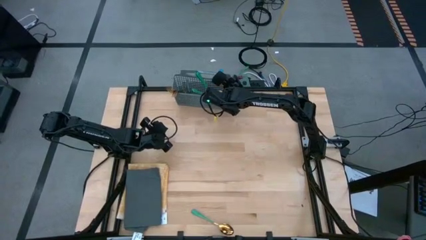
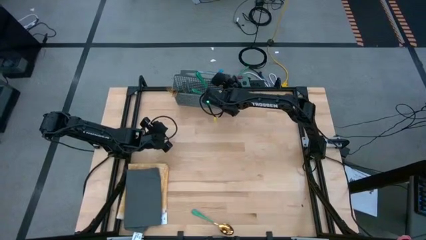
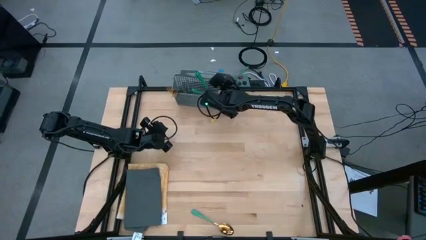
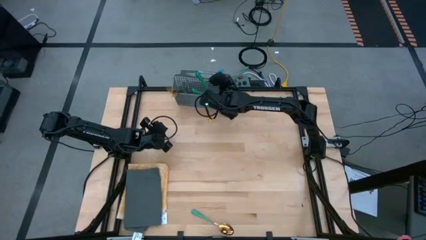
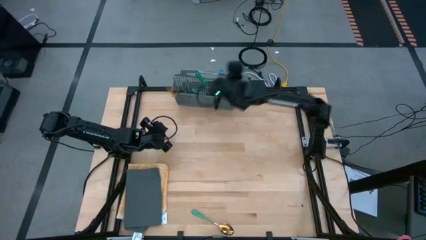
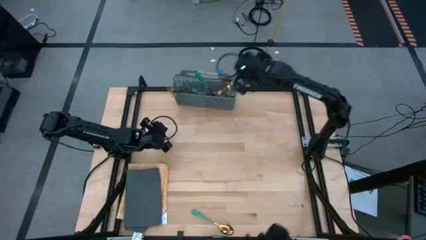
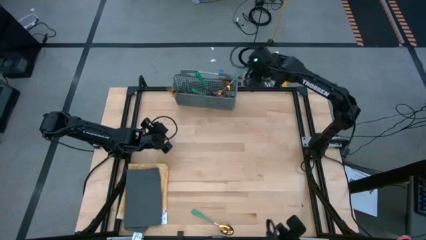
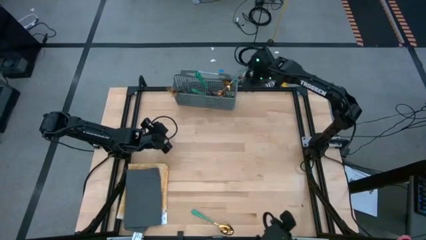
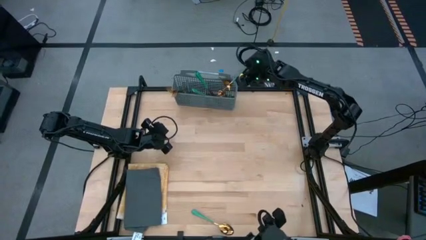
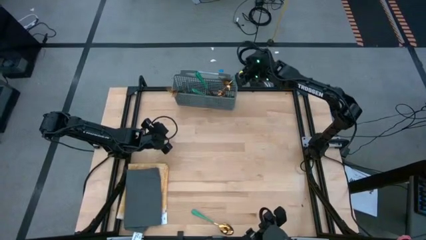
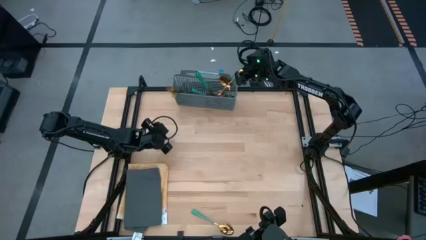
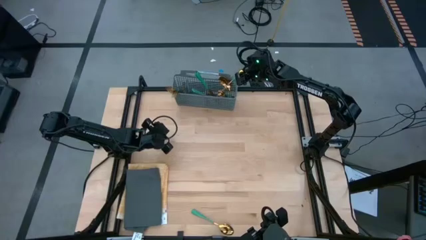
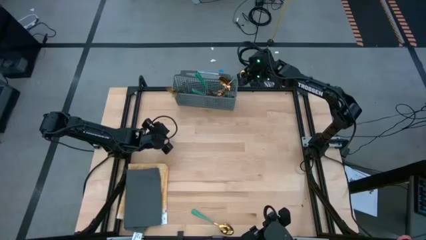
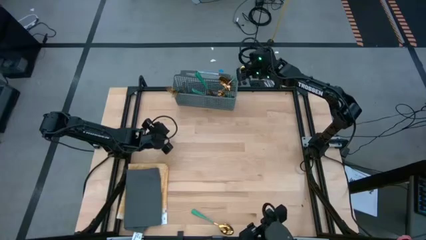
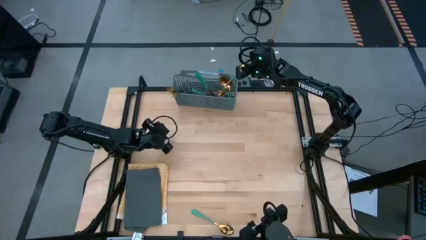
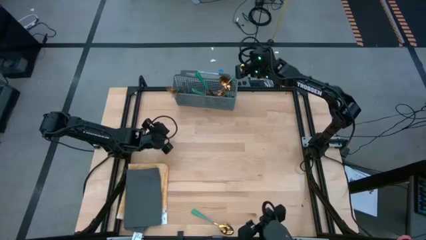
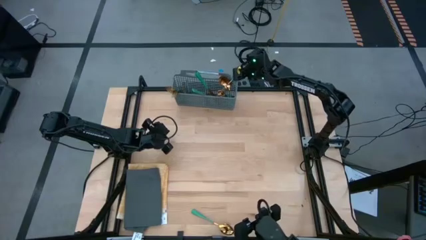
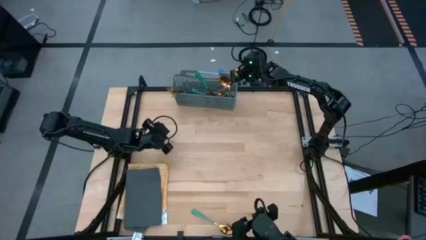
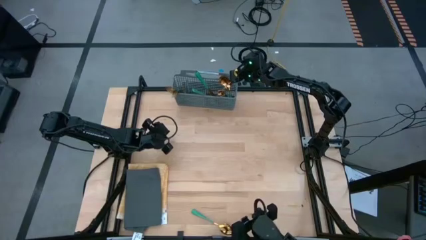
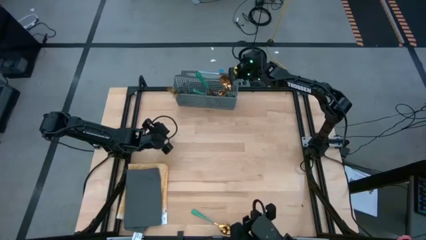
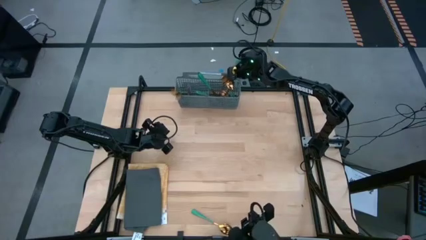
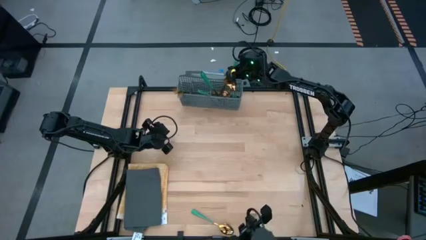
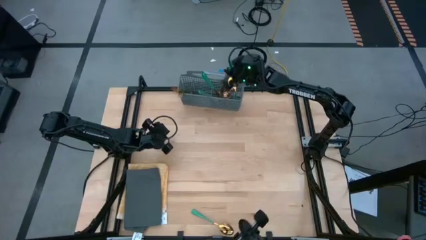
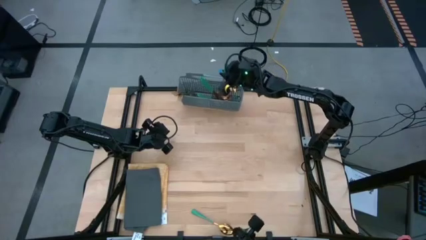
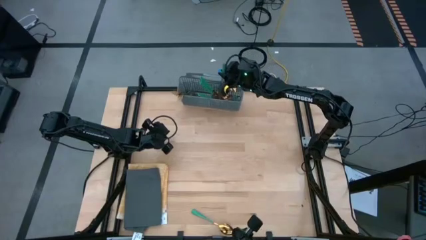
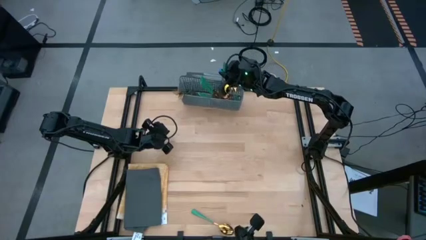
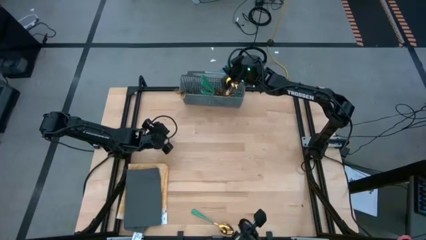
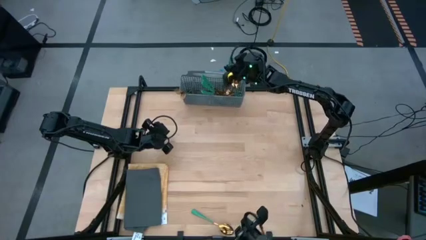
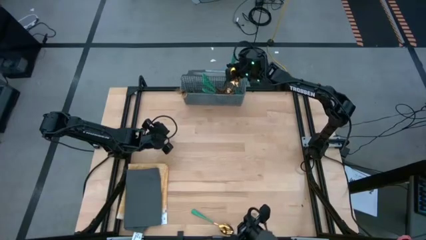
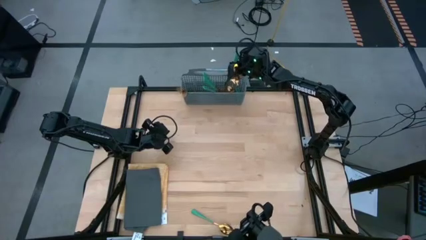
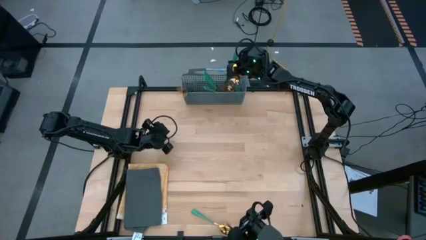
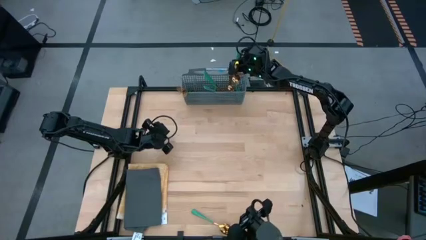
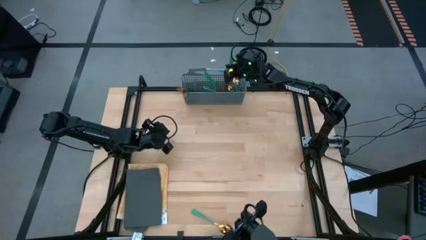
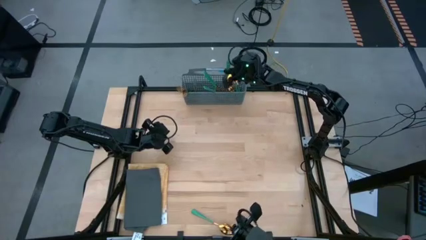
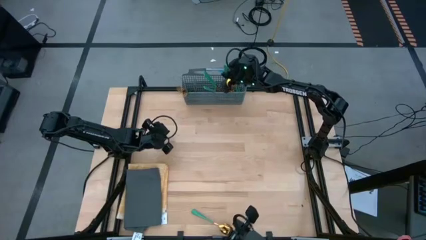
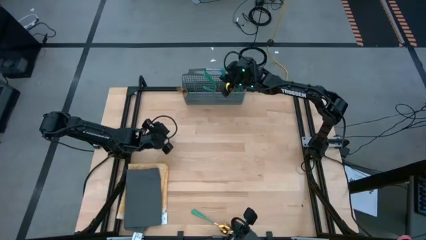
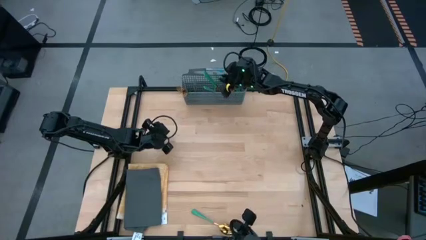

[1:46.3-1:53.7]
Task: Sort silverware
Put the green table knife into the gray silverware basket

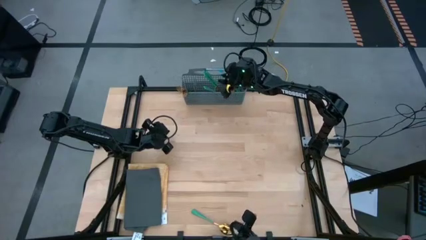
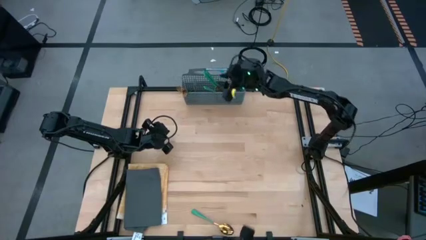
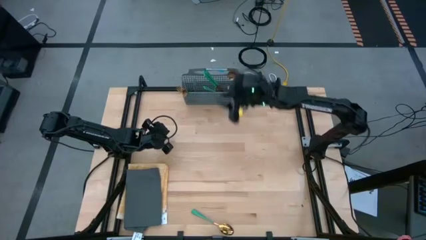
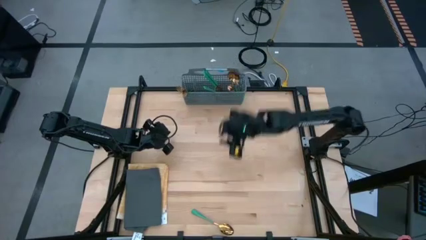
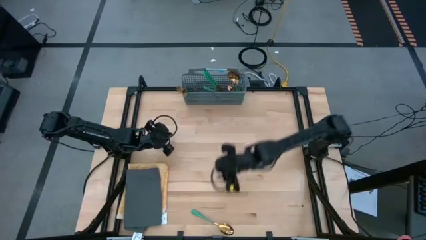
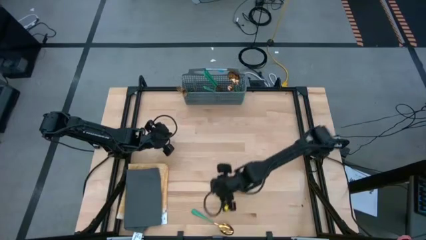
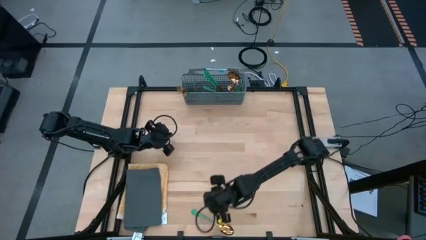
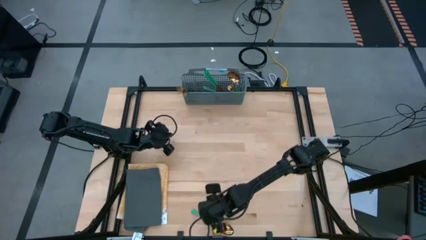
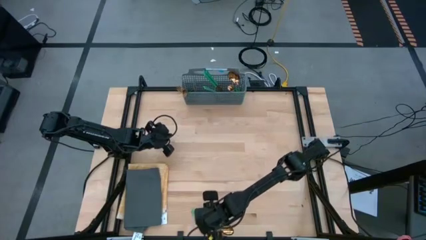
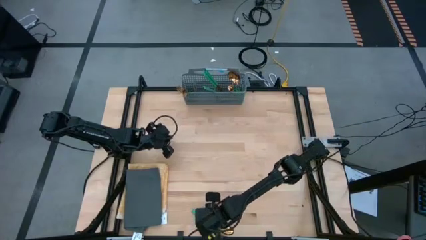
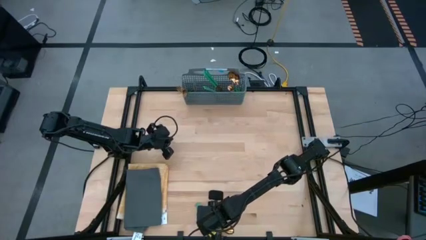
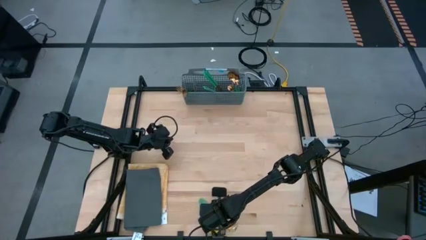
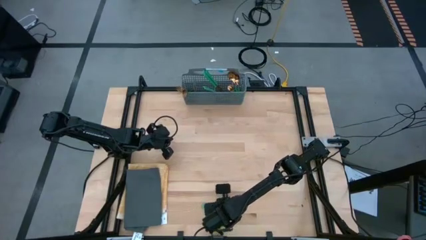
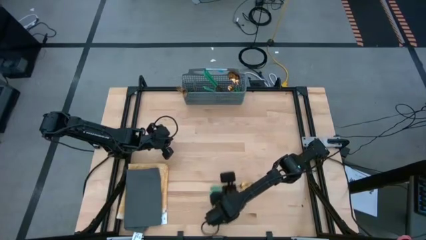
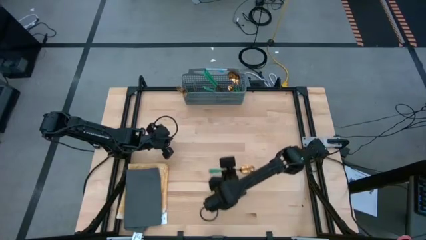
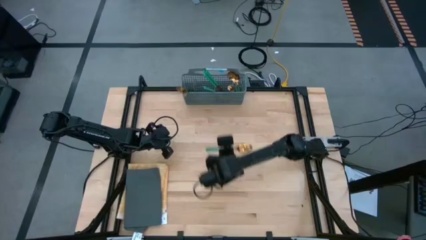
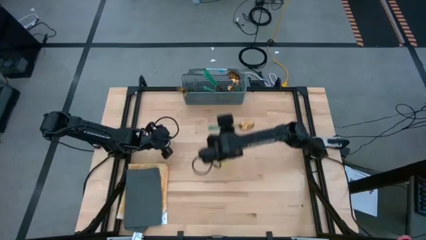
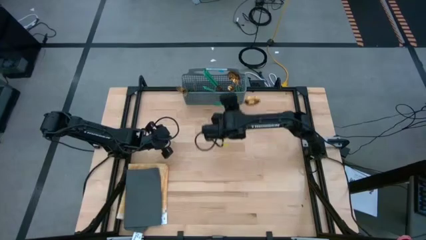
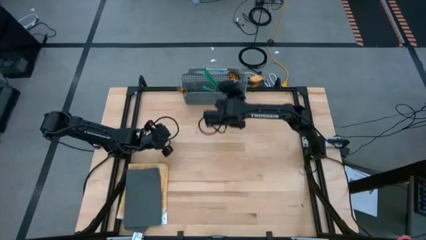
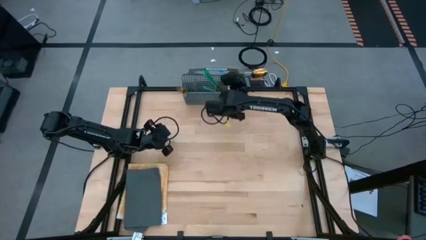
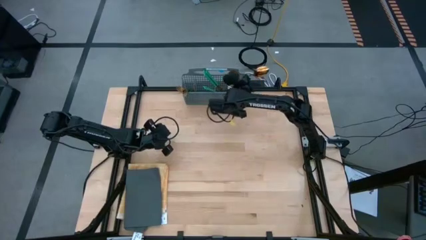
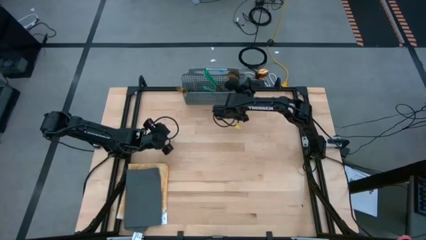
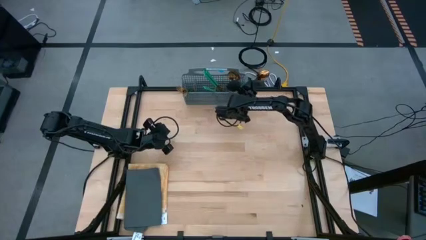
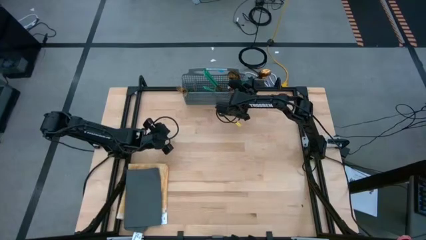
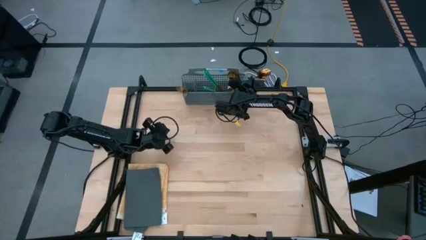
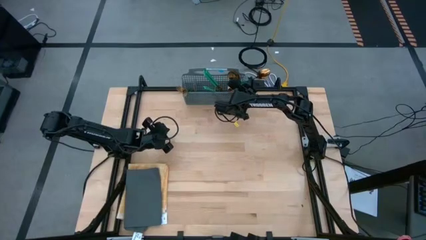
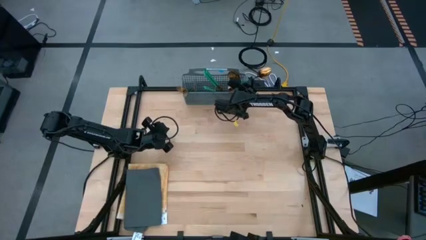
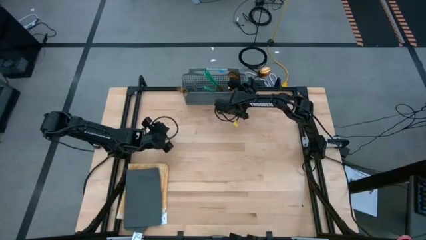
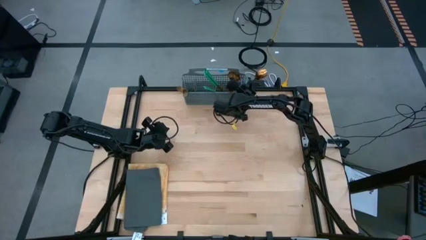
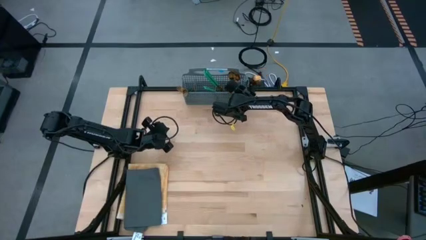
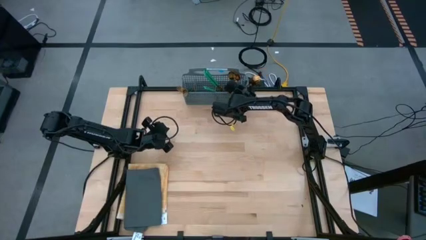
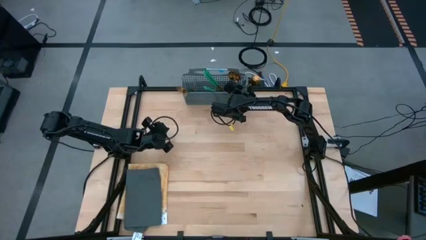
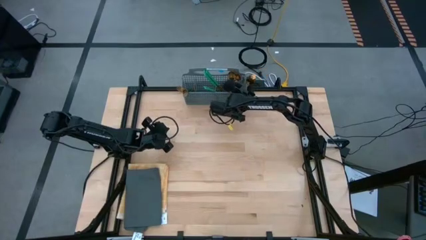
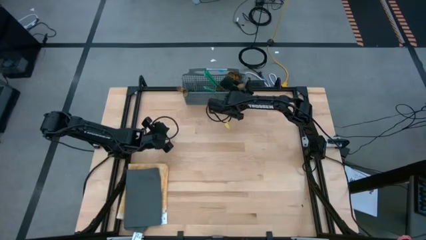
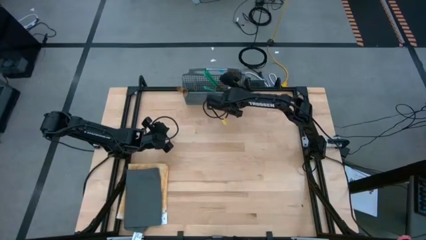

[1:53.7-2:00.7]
Put the green spoon into the gray silverware basket

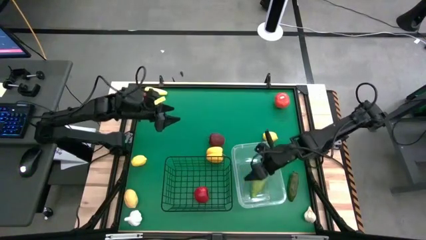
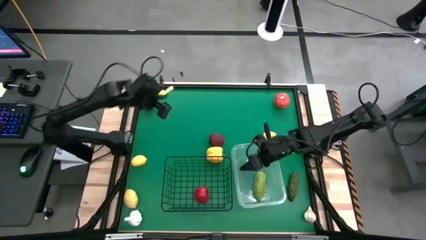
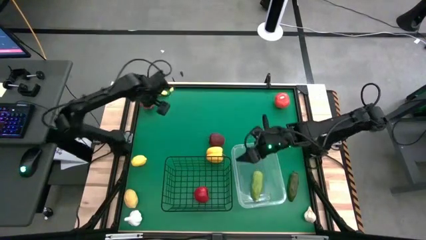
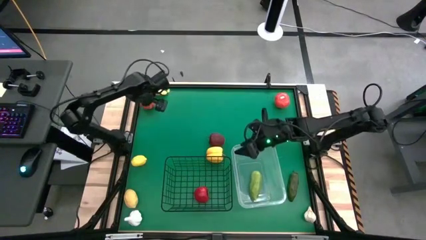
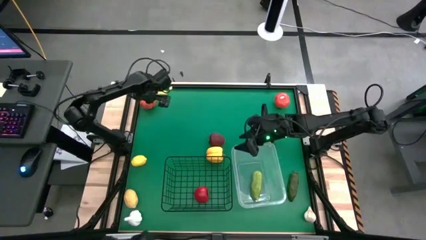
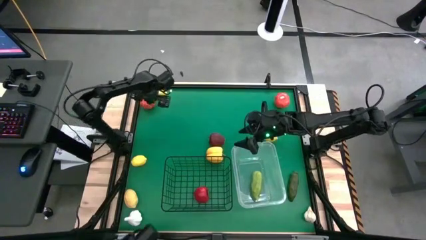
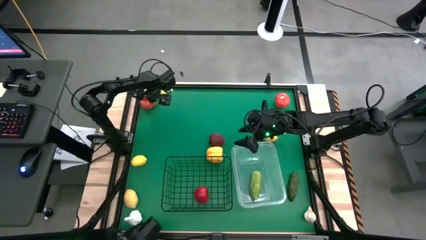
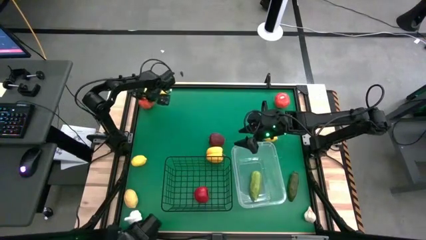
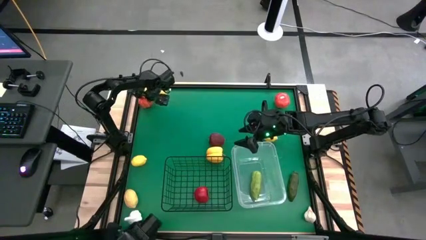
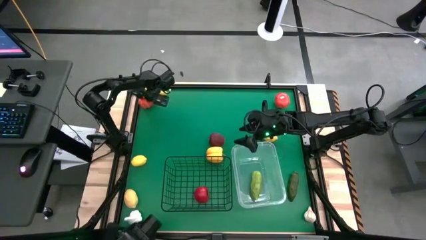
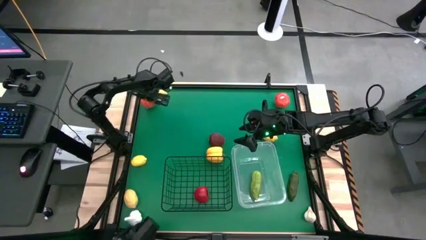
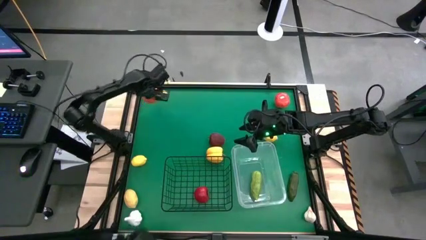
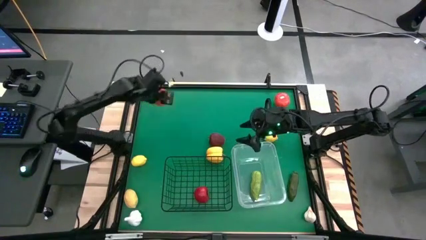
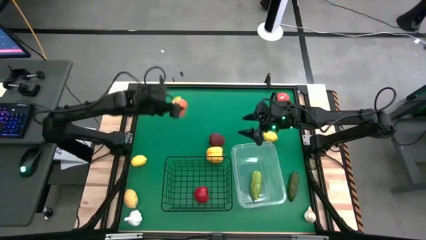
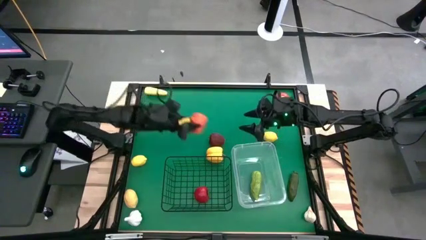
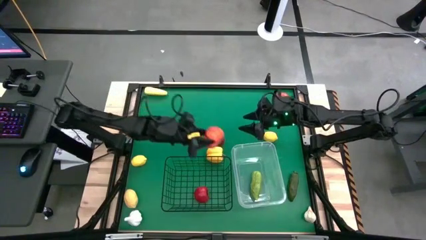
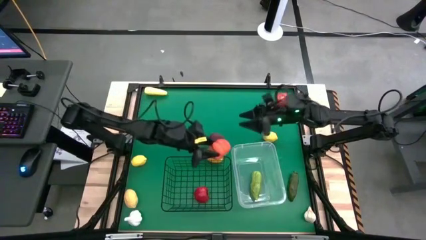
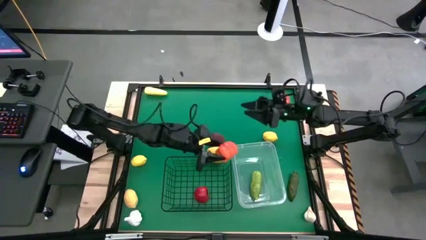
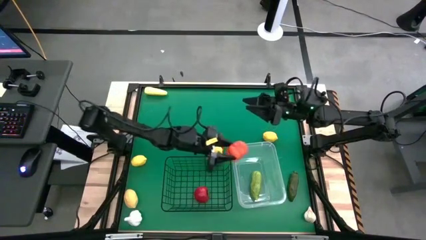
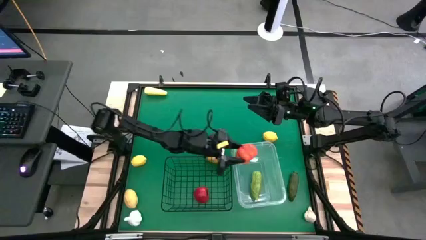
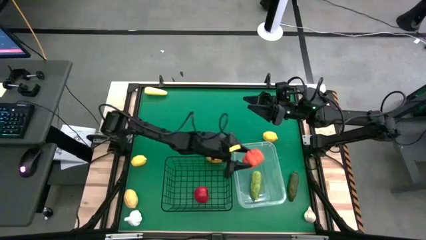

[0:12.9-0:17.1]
Task: Sort produce into baskets
Put the pumpkin into the transparent bin
